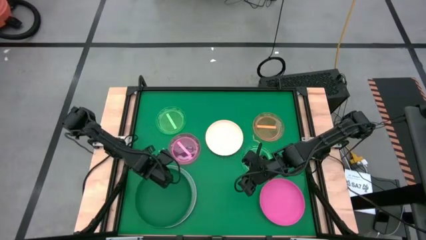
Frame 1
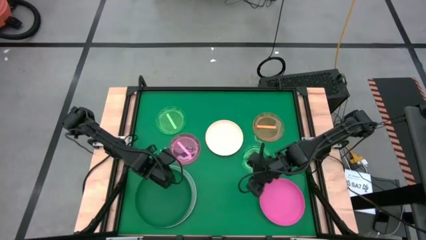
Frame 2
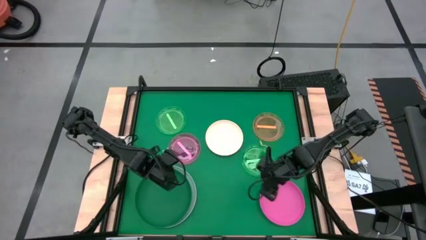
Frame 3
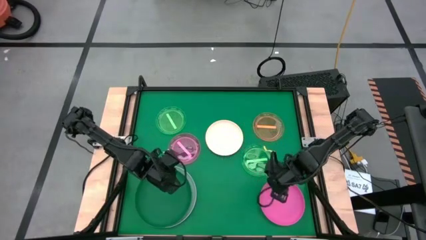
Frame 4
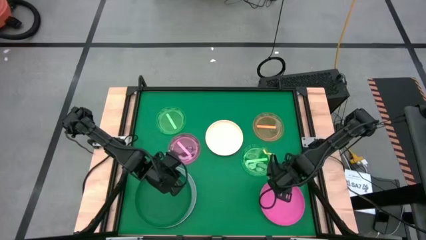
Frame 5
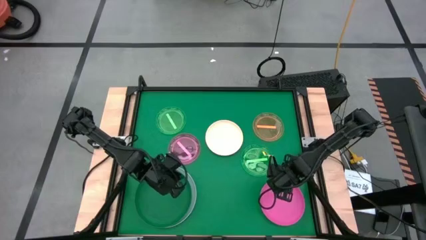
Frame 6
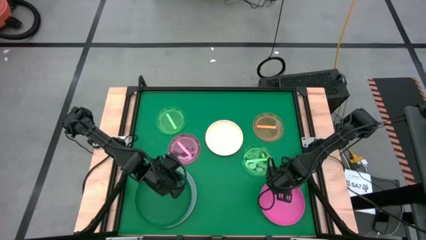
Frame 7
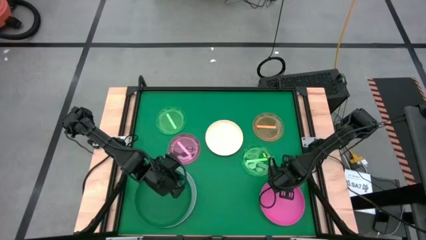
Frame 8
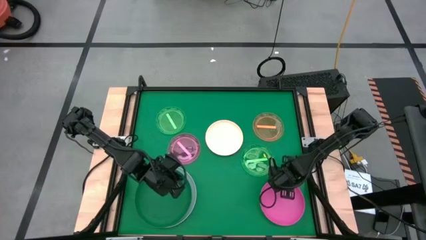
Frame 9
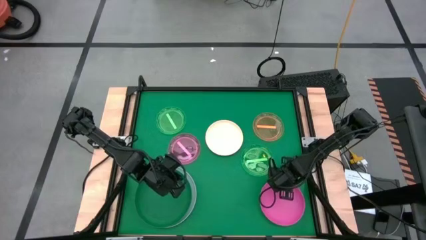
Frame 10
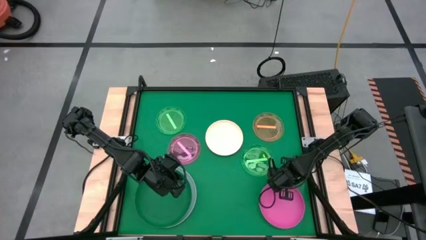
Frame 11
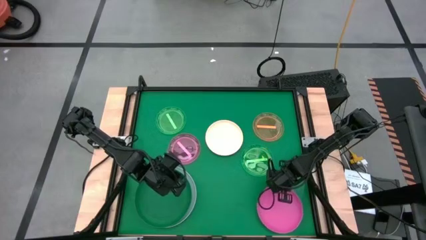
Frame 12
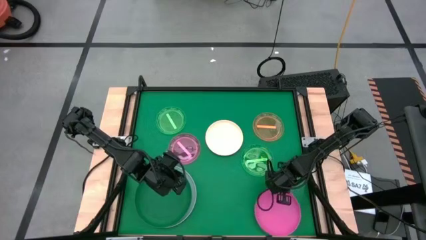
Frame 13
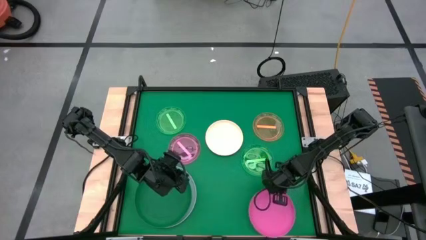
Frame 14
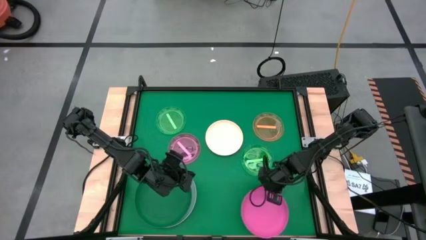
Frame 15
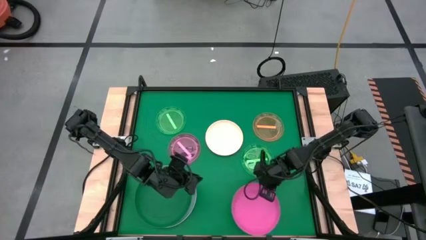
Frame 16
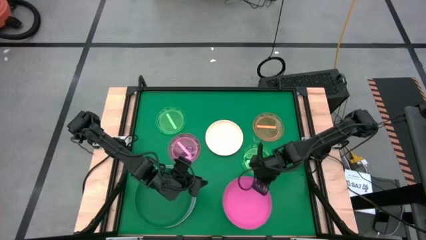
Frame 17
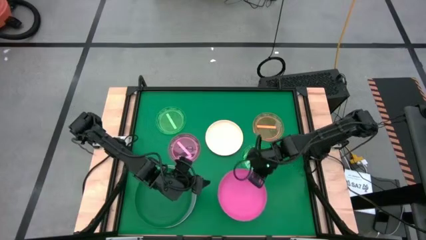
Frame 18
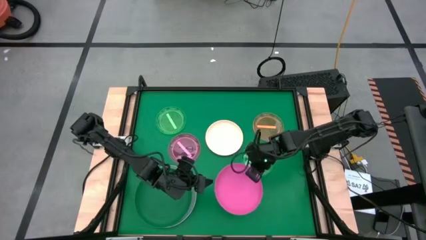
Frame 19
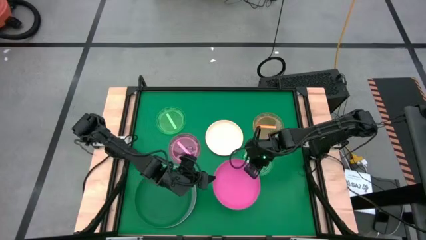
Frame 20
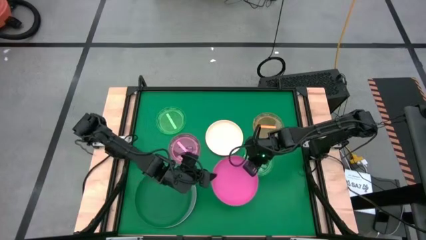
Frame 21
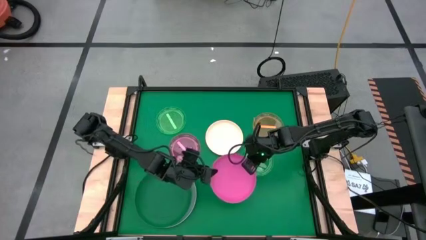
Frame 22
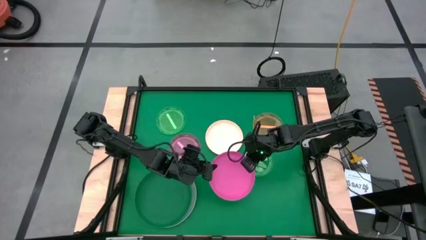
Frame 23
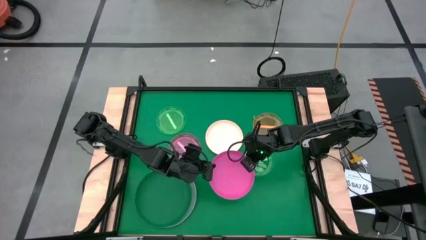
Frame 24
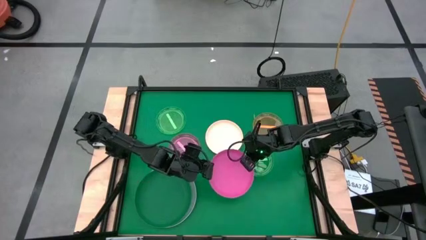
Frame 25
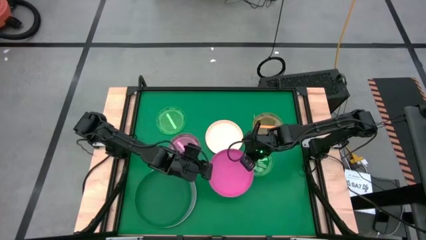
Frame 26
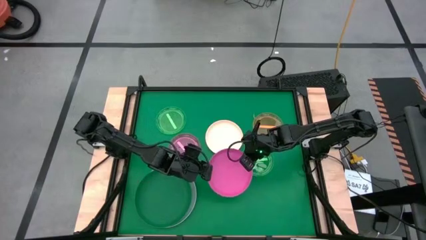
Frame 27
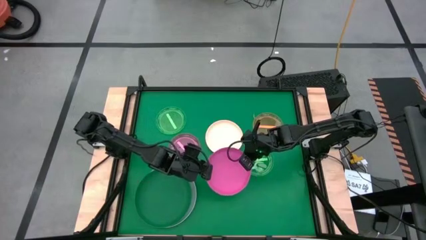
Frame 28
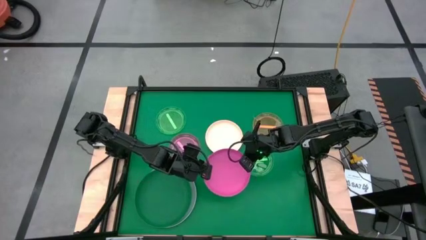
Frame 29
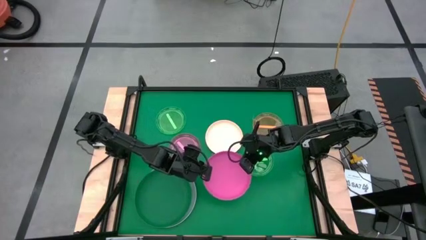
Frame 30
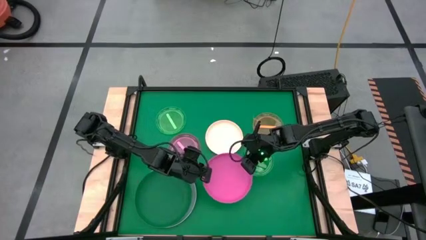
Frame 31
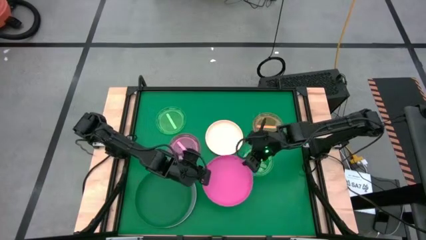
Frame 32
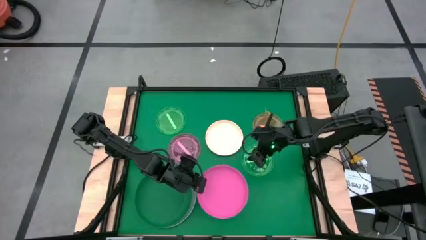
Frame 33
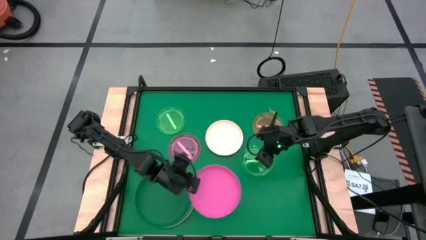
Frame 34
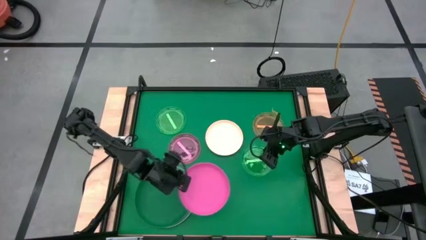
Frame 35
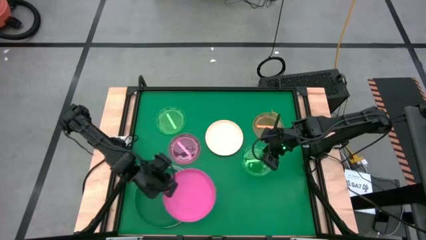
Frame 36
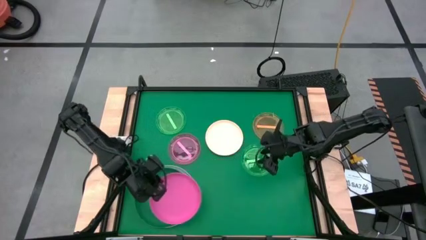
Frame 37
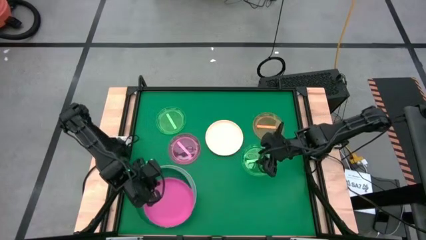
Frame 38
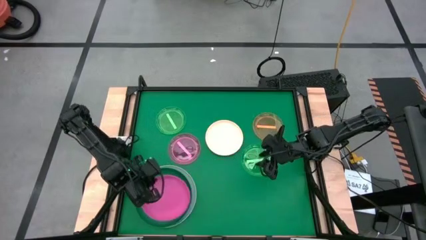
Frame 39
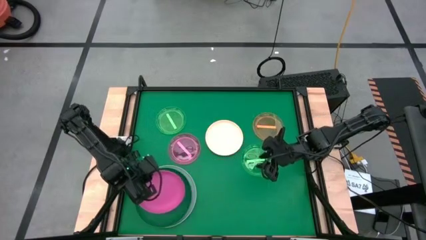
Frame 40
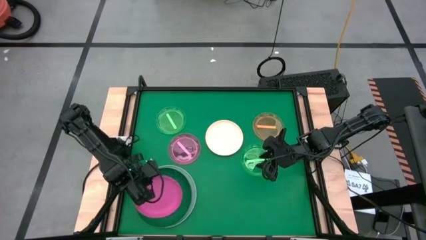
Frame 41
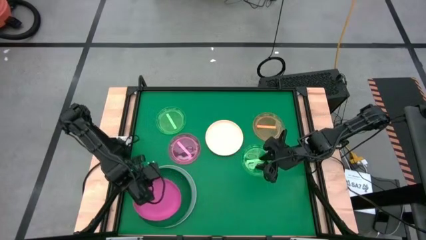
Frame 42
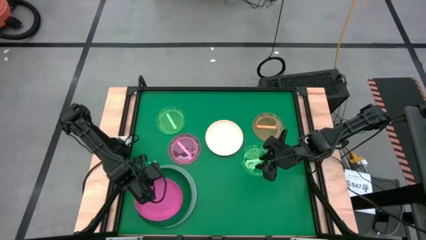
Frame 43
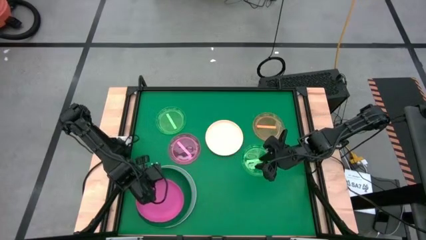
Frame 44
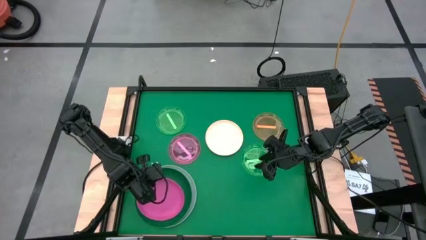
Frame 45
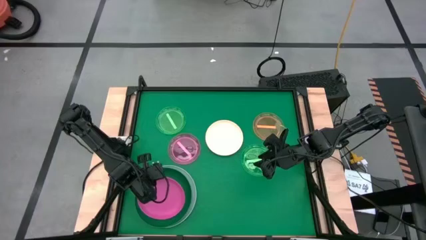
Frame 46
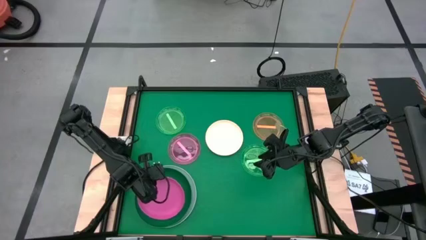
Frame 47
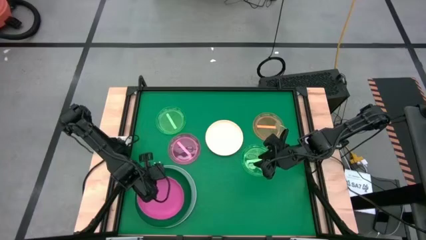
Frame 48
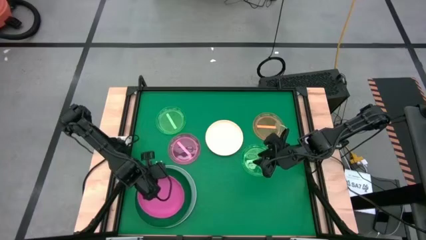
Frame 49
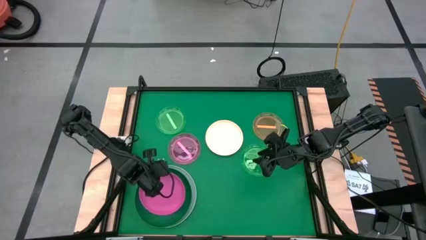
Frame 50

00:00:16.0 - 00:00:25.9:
Task: Stack plastic plates
Stack the medium pink plate on top of the large green plate

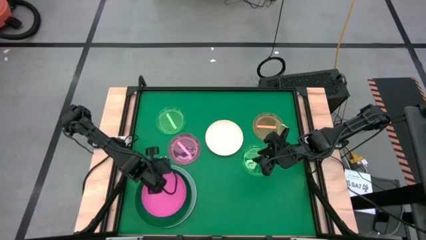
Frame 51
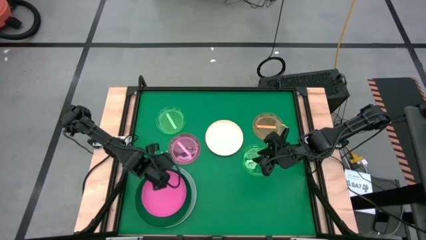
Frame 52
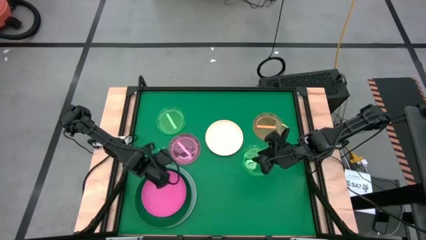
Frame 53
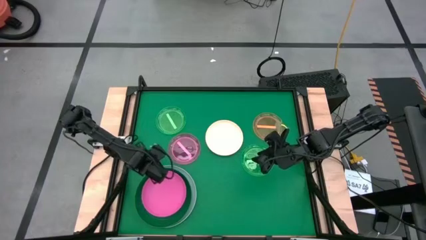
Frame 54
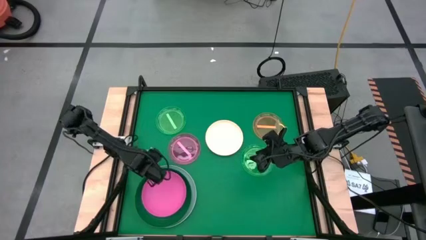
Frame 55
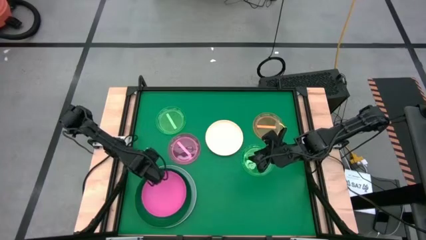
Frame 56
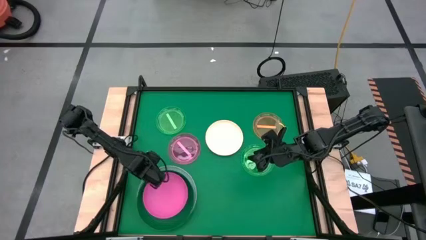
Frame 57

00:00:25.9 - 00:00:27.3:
Adjust the large green plate under the large pink plate
